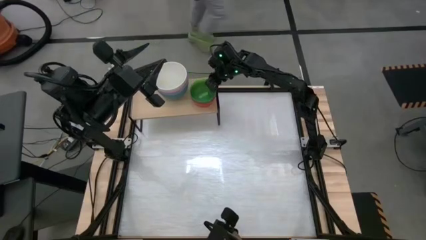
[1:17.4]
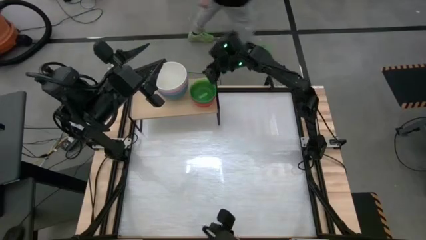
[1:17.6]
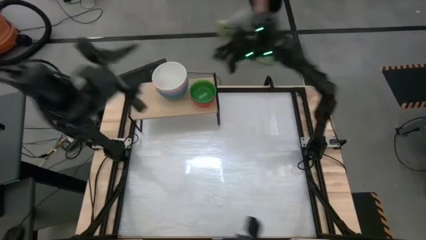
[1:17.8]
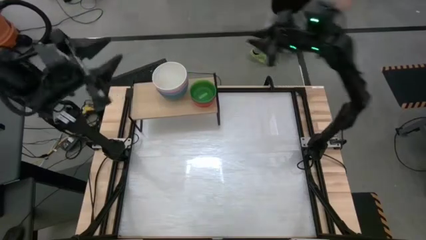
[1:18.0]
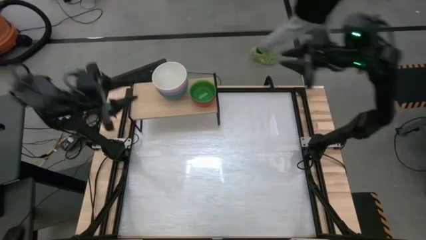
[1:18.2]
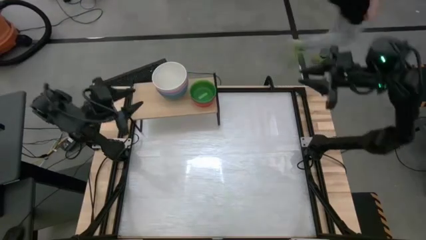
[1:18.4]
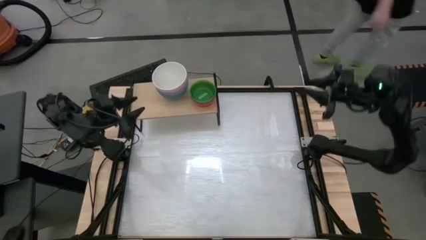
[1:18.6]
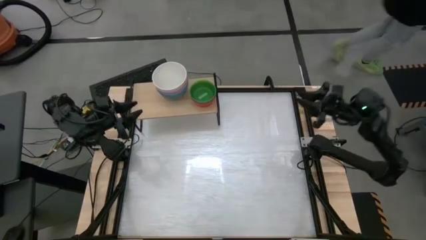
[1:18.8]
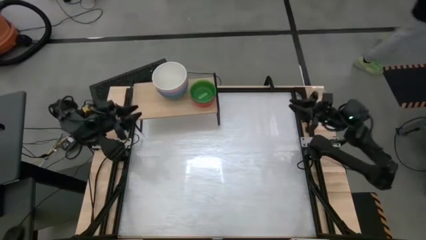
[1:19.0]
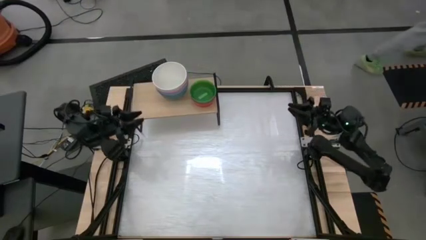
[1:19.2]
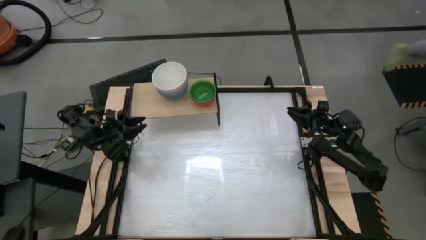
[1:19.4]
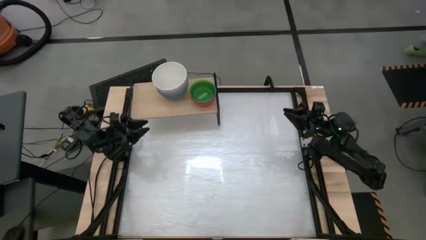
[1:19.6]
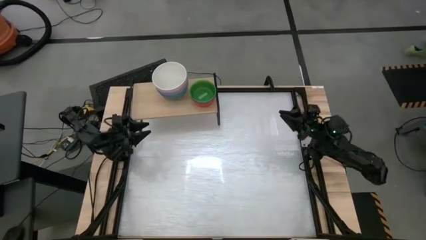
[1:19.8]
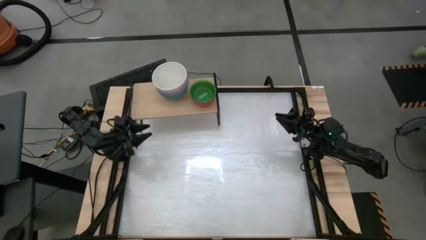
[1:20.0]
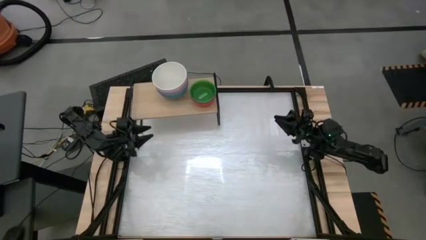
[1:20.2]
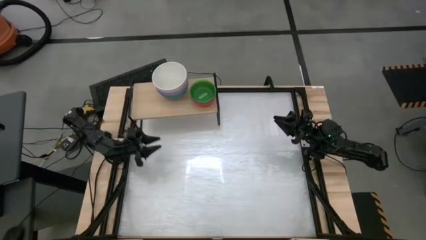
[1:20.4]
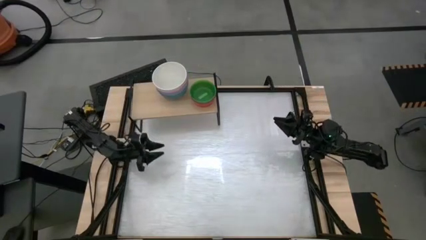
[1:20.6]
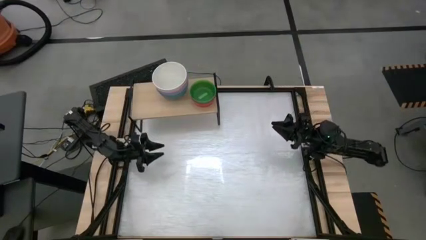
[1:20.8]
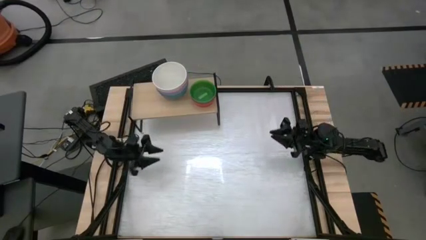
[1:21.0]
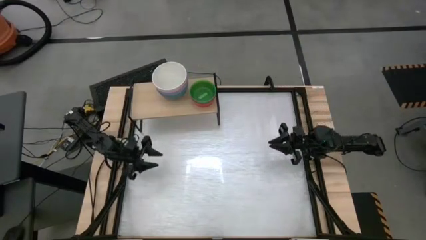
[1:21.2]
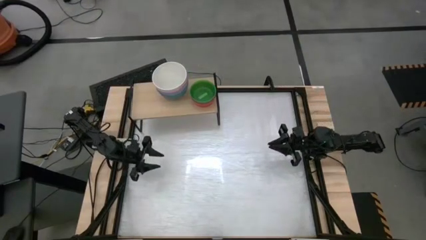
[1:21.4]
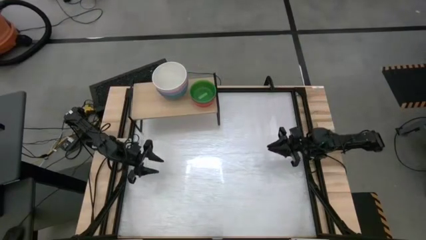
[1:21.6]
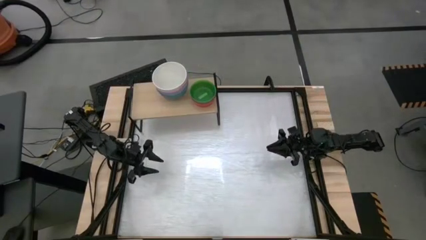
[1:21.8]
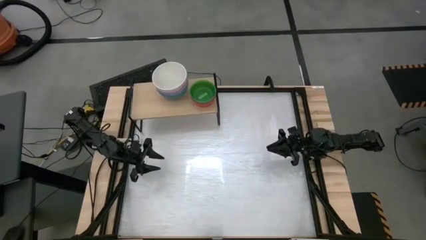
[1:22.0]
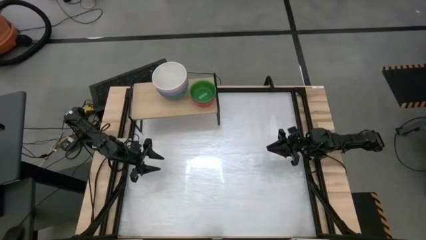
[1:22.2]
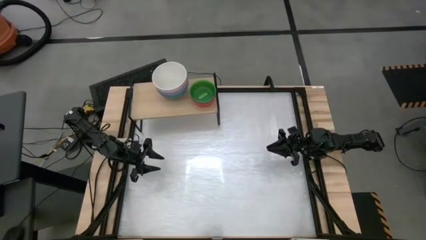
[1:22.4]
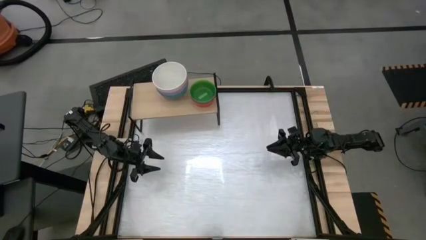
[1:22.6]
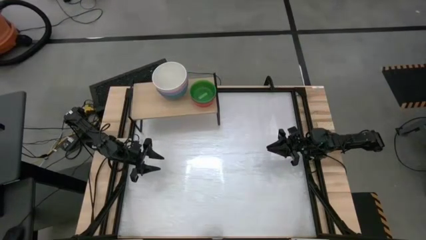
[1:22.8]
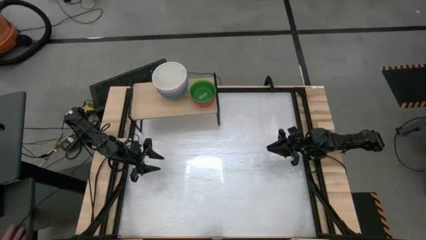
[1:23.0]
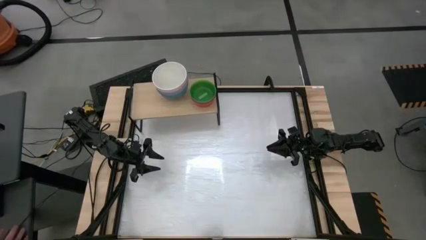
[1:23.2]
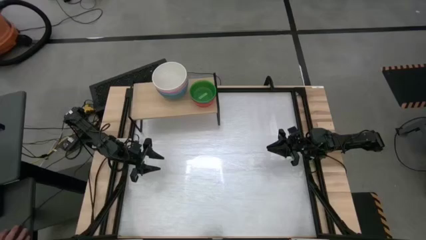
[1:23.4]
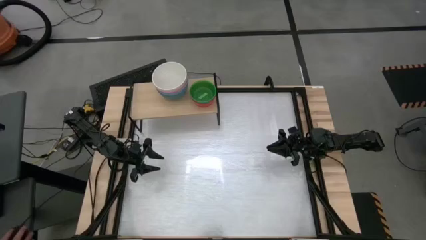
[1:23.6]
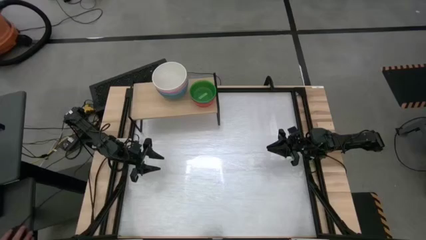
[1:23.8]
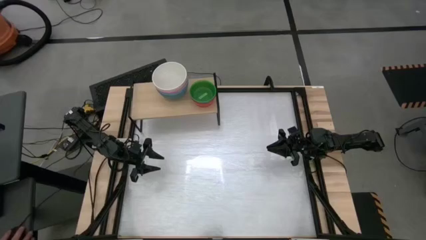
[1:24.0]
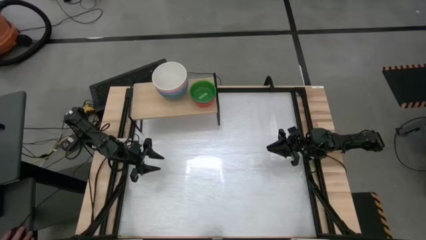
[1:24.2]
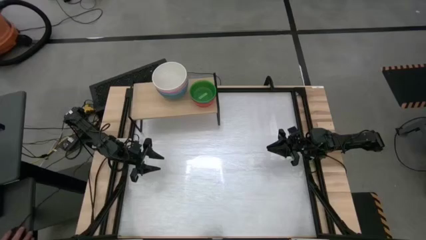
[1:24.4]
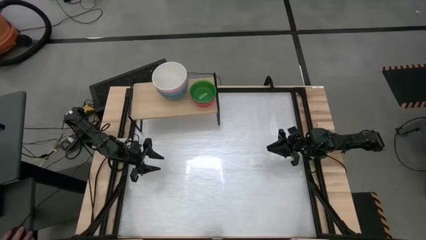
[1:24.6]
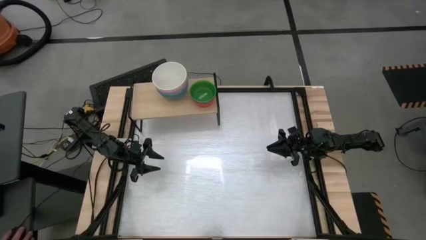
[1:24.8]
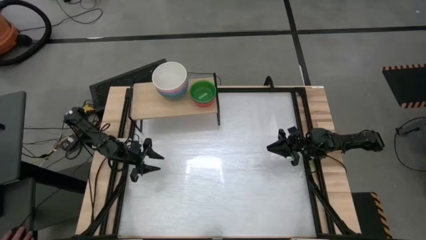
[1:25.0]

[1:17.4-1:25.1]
Task: Place and stack bowls onto a shelf
Return to Home Position

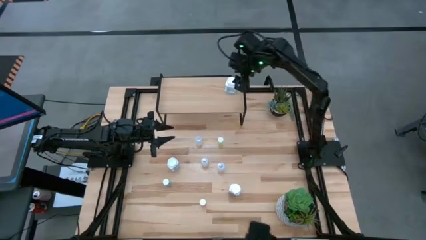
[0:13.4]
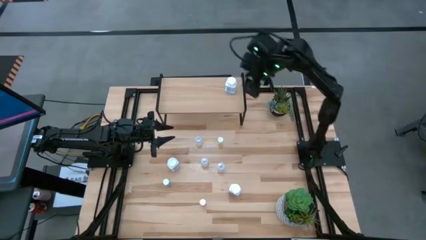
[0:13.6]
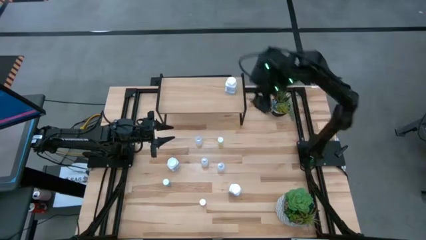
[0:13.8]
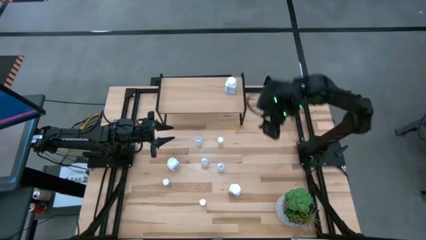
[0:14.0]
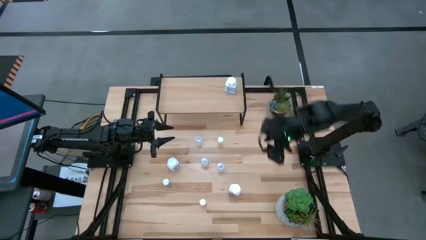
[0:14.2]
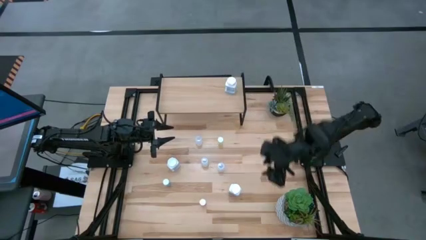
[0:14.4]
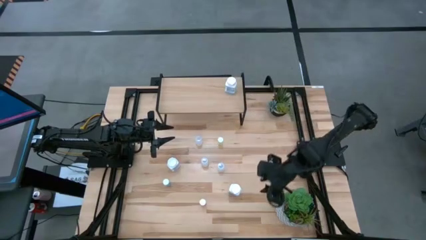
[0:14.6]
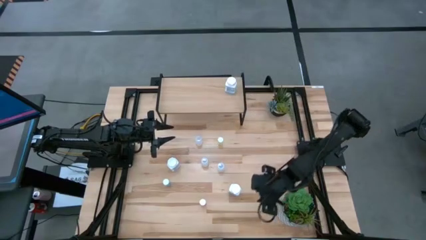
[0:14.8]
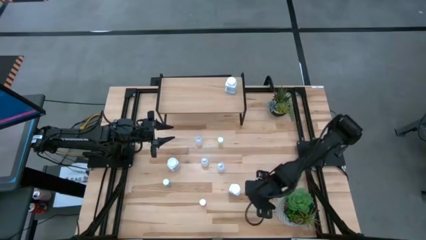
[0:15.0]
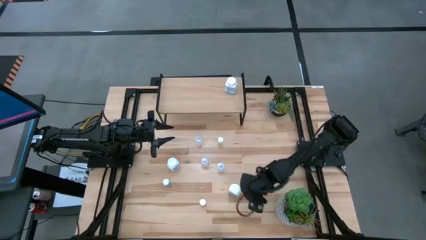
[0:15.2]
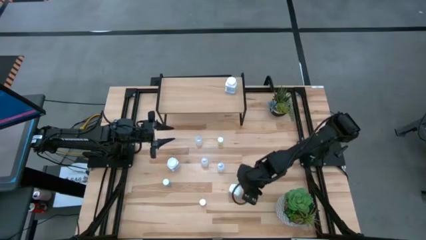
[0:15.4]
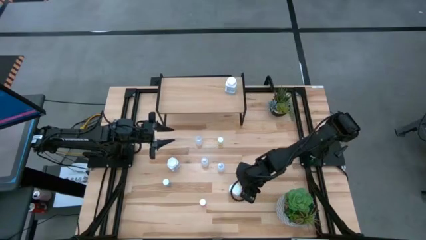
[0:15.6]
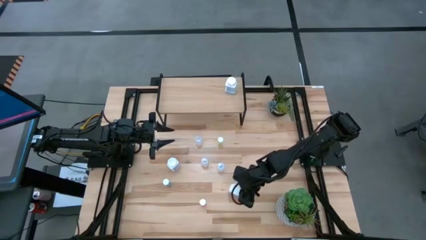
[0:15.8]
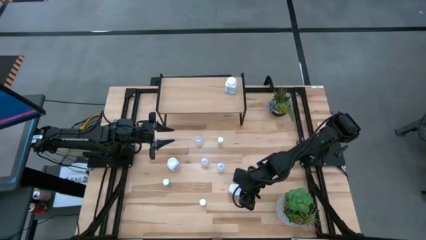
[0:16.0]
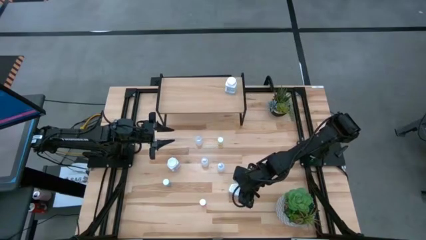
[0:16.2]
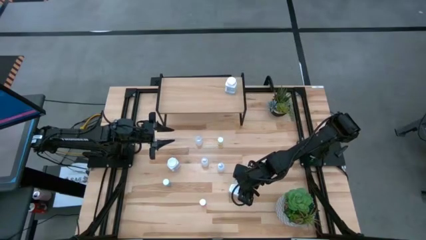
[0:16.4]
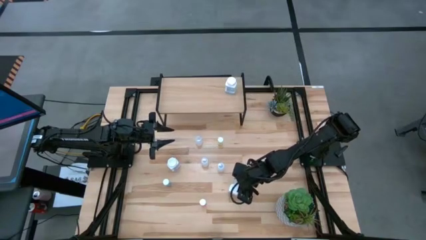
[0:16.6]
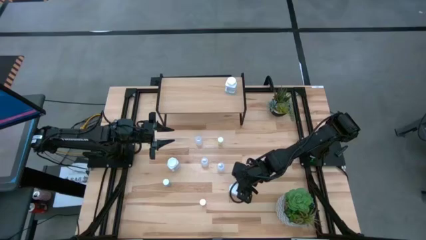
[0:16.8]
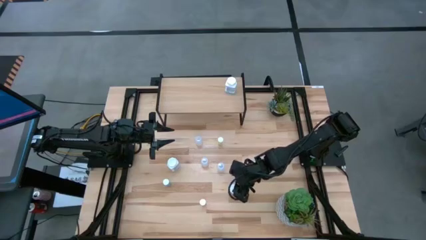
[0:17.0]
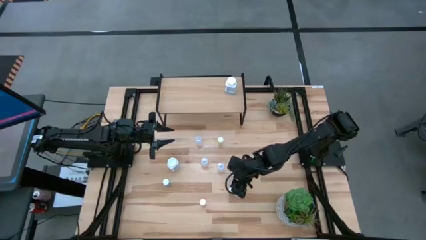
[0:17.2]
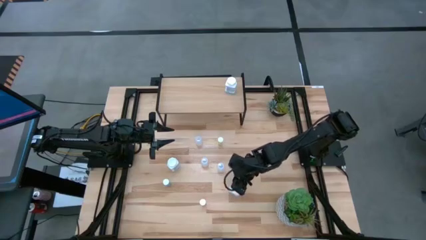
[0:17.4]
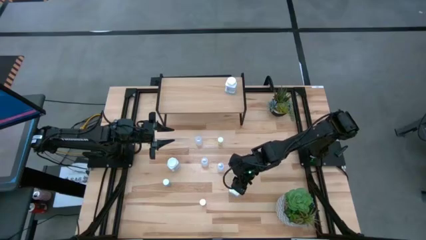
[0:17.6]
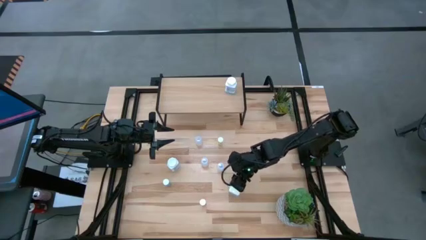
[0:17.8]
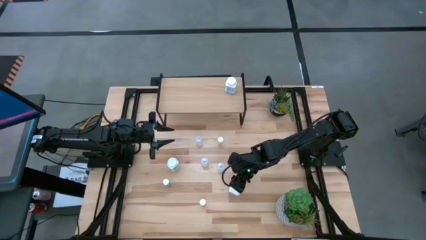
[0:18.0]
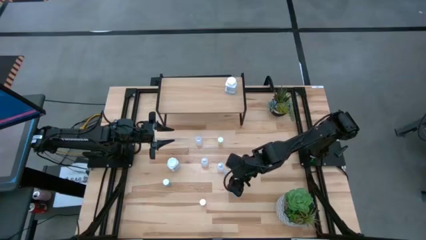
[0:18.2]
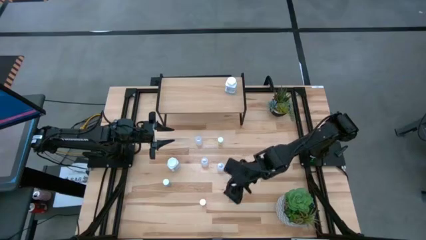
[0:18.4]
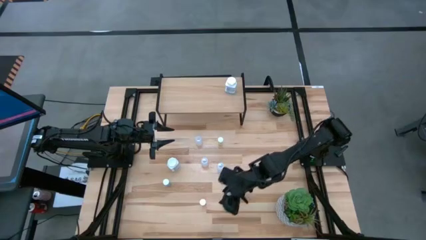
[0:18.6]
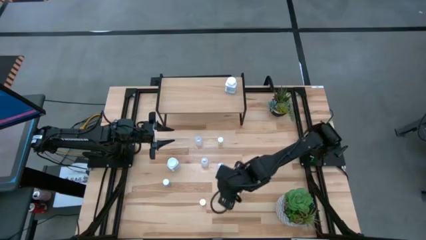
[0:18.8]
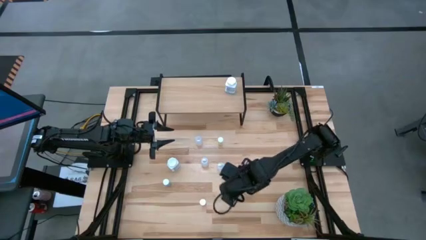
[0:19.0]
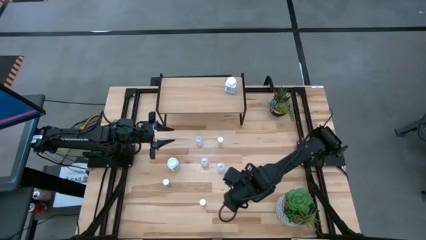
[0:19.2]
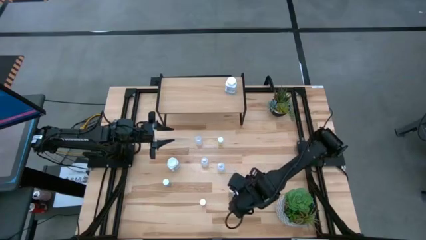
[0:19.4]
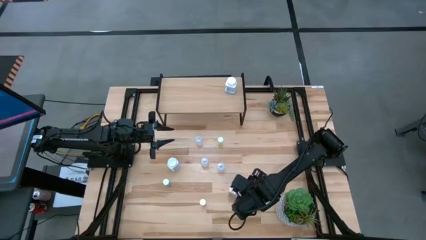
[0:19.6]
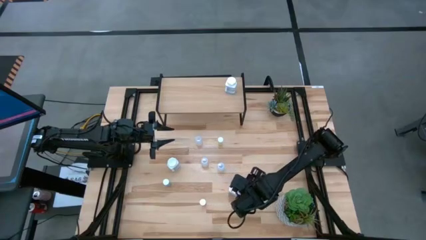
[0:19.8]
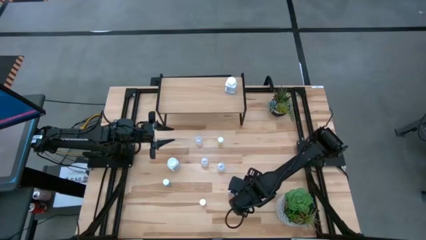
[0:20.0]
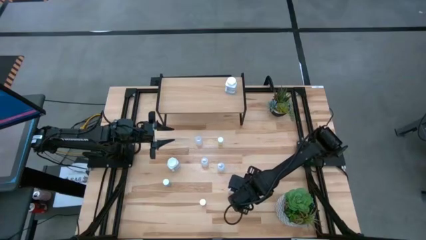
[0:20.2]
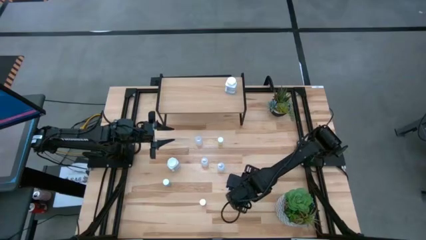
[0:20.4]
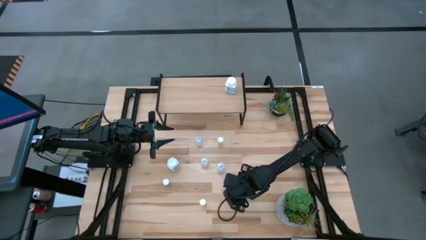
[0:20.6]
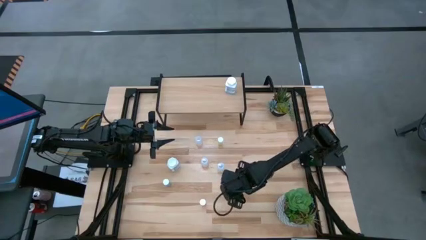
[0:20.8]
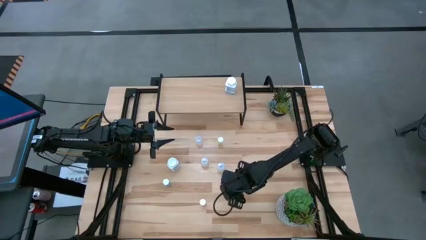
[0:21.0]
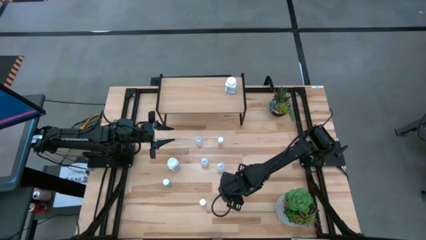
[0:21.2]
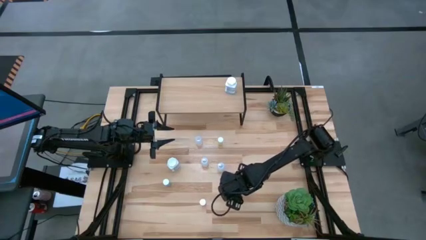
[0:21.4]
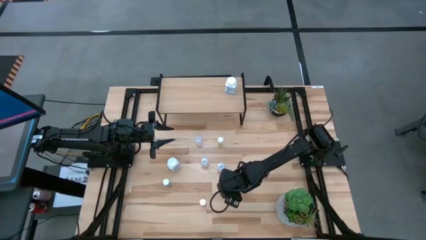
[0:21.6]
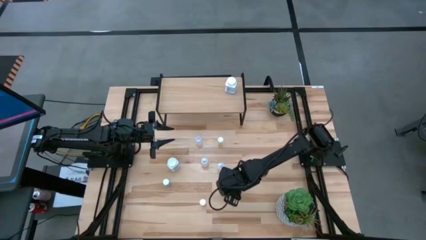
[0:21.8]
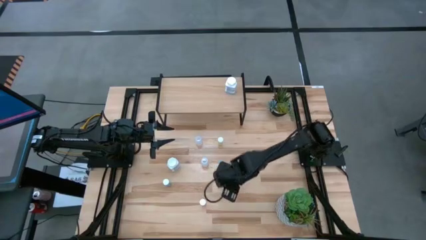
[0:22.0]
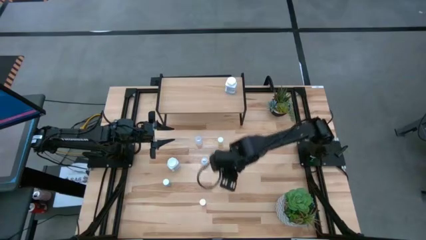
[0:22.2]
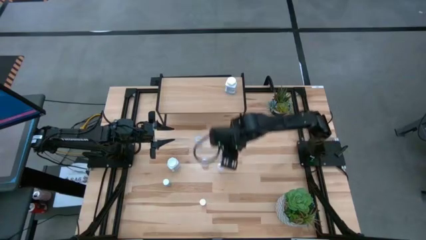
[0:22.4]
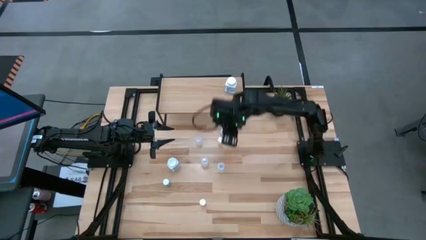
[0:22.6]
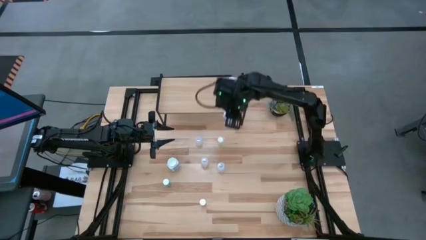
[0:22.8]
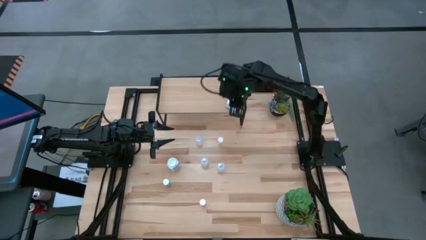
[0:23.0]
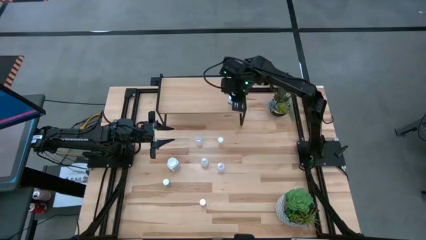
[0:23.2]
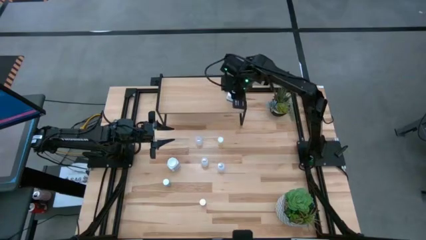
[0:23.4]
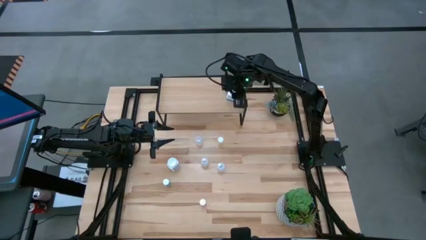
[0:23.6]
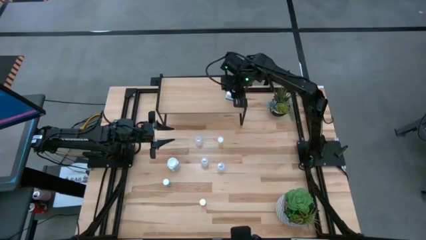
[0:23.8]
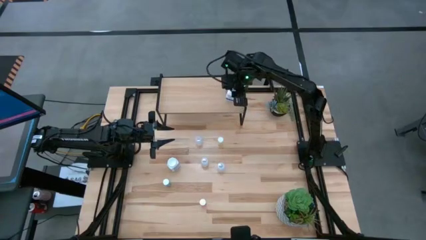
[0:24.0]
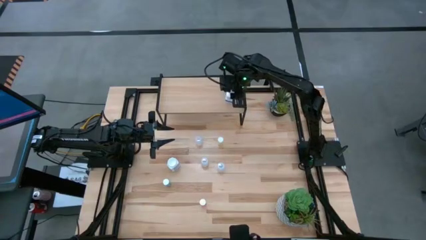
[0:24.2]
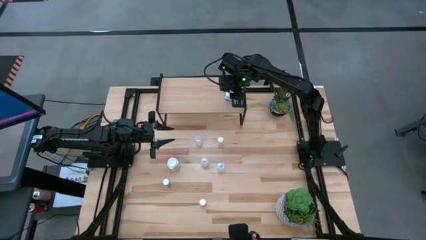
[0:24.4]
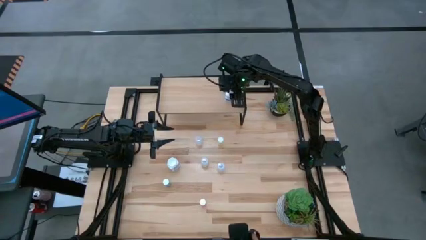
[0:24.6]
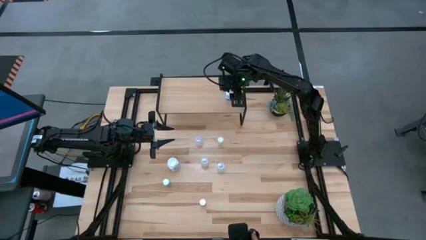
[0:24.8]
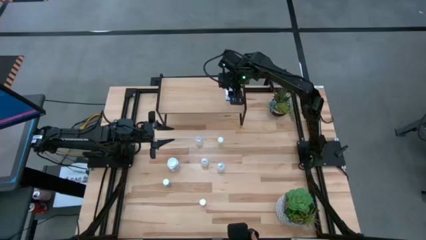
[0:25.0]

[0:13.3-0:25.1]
Task: Pick and place medicine bottles onto shelf by color
Put the bottom big white pill bottle on the shelf aligned with the other big white pill bottle
